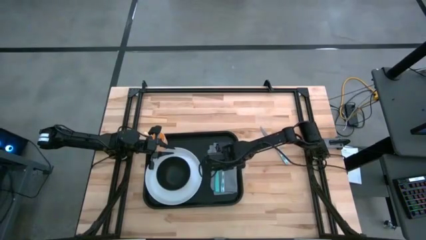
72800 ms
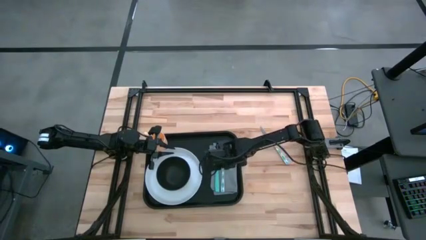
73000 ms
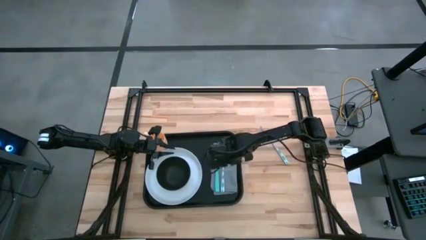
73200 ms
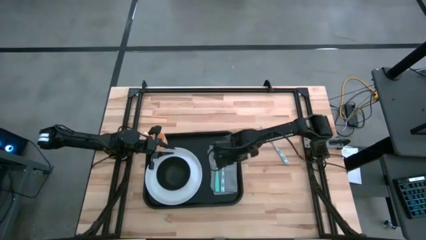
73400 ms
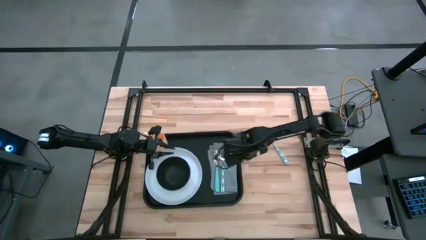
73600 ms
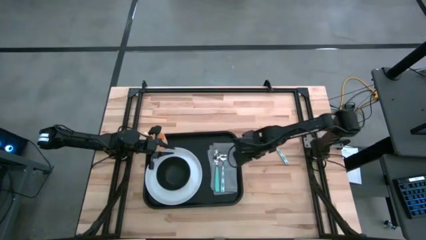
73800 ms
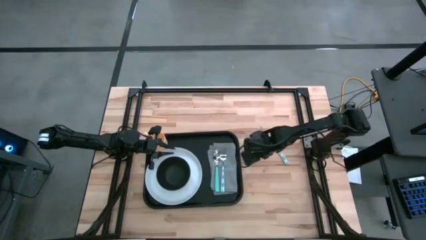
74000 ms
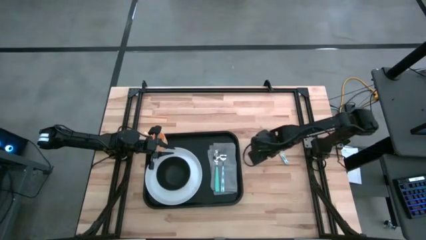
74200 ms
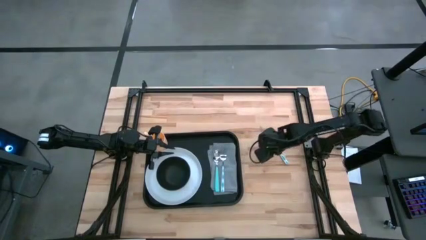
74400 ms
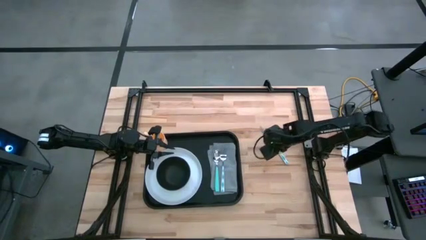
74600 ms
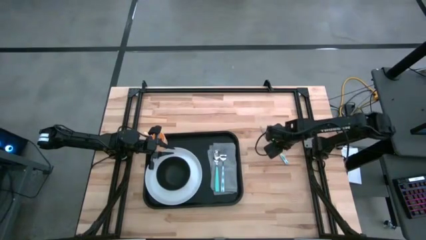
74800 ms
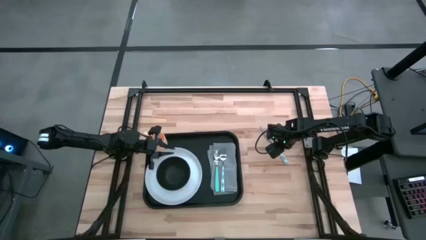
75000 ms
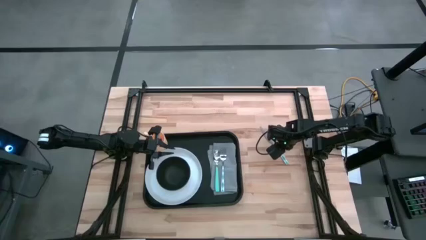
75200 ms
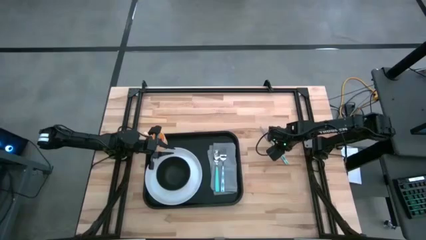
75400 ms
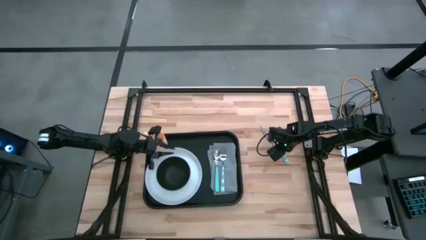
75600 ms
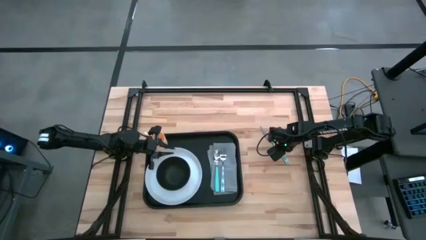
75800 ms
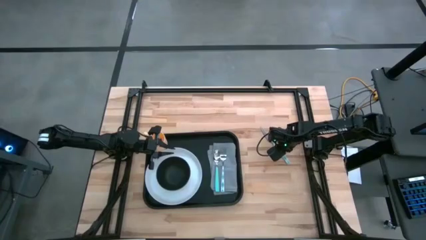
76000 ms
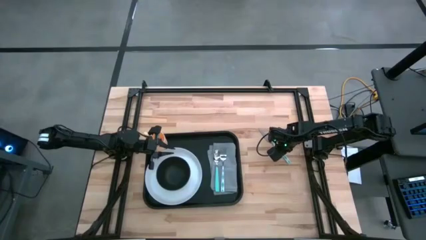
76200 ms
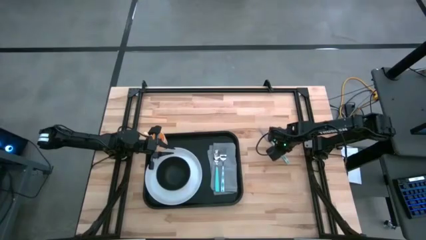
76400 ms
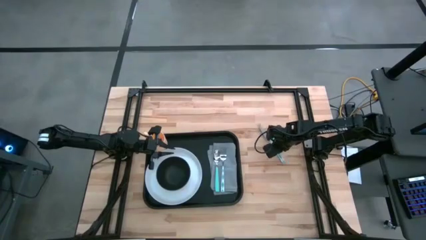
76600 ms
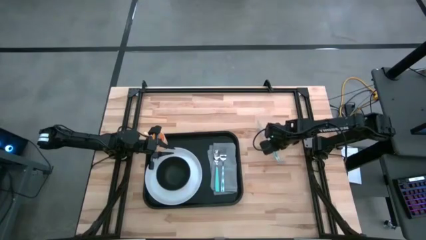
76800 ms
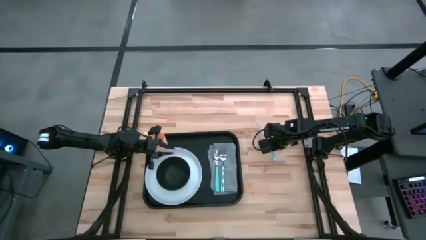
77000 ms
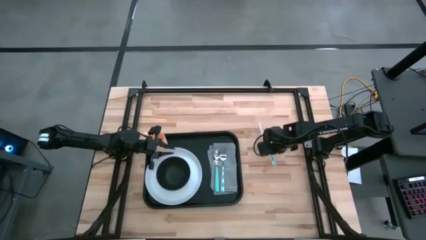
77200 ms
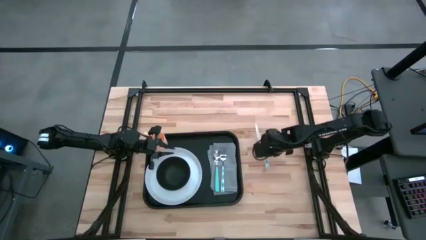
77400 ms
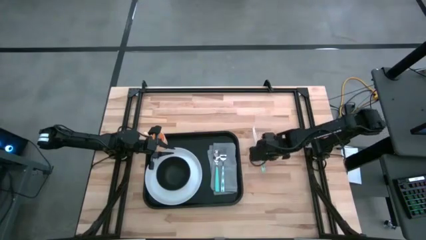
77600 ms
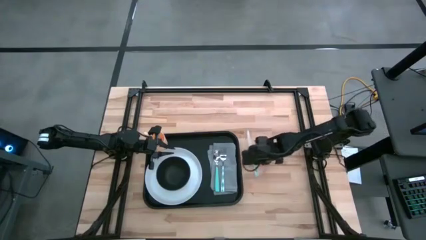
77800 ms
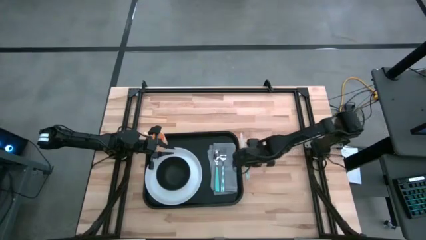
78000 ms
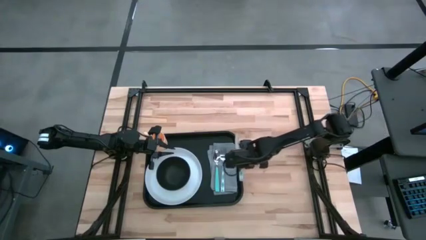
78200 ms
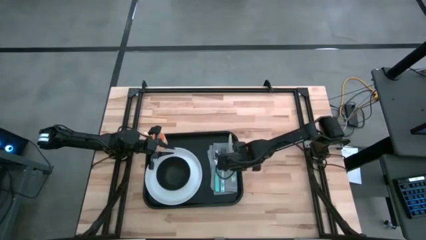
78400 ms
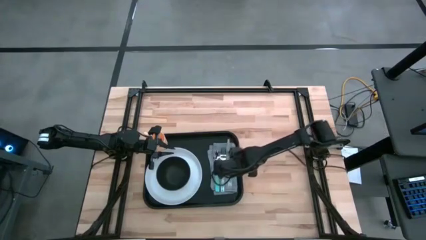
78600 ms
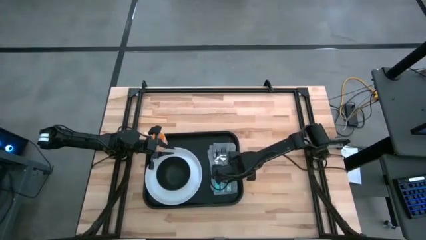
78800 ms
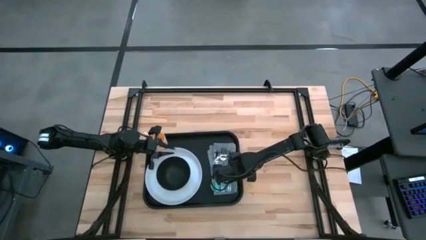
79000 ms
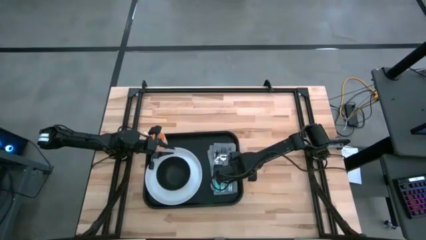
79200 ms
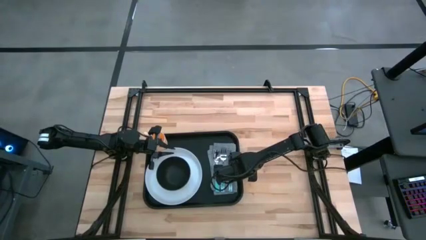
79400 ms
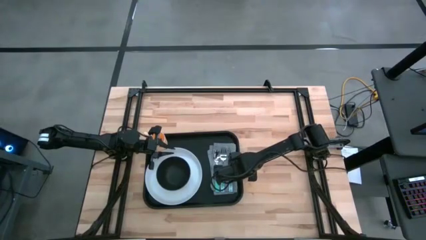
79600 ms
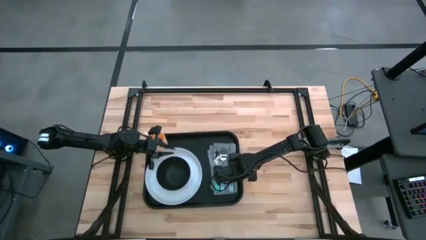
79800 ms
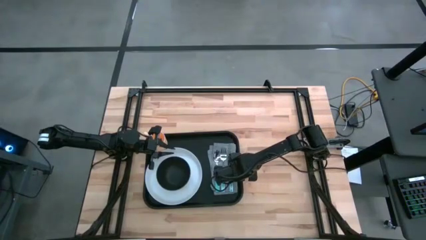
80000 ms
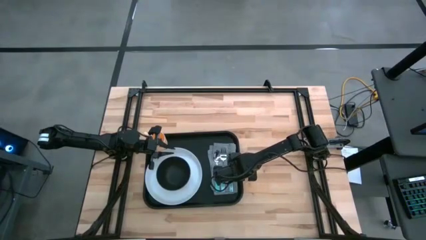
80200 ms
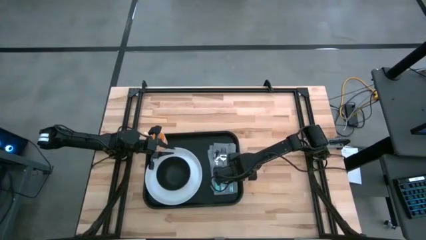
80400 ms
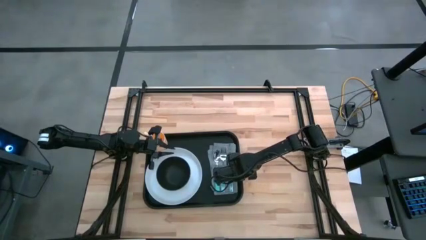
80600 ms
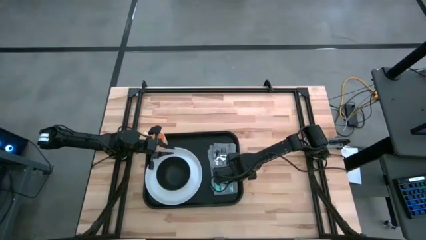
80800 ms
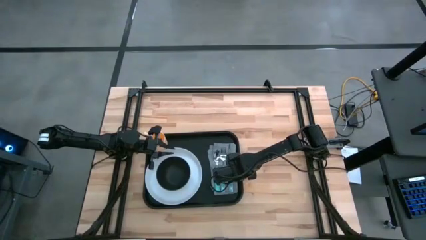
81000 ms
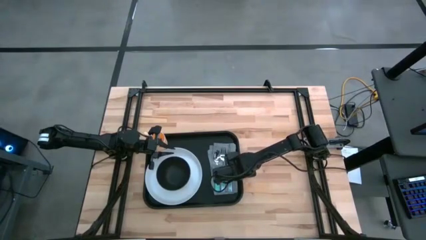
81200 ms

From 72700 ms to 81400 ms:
Task: Set up tray
Put the white knife on the gray napkin to the right of the fork

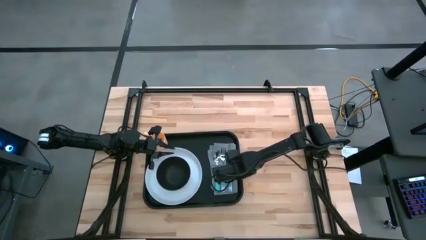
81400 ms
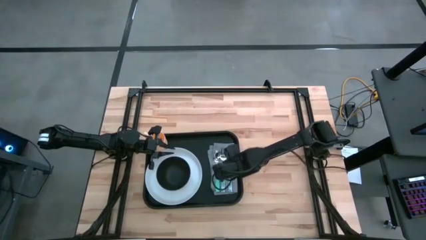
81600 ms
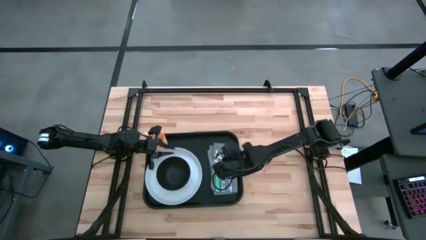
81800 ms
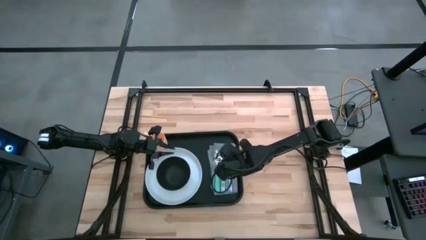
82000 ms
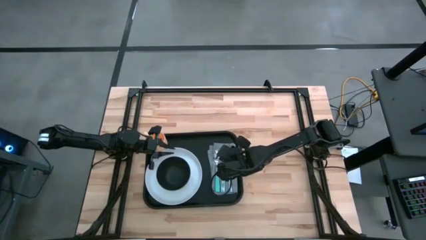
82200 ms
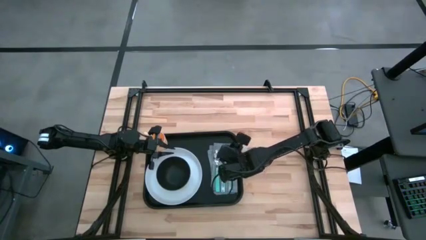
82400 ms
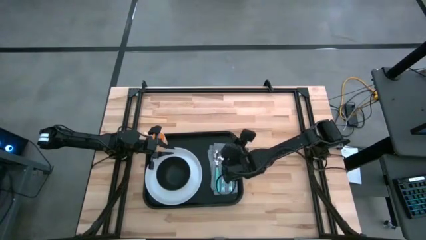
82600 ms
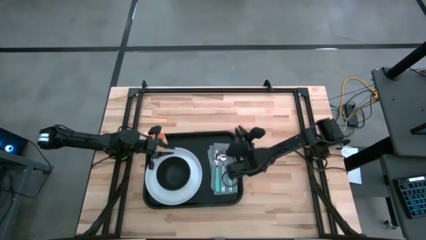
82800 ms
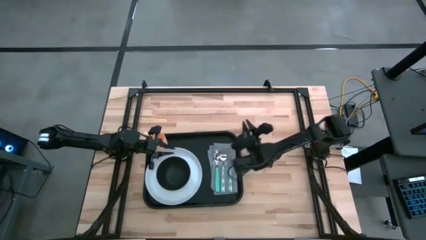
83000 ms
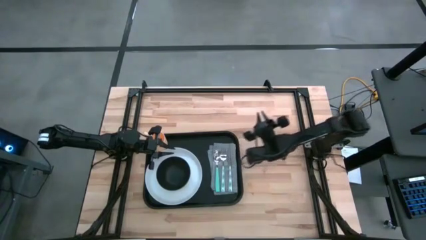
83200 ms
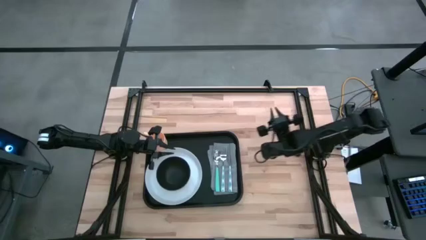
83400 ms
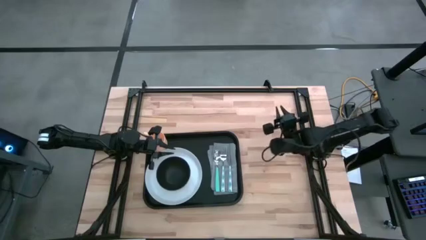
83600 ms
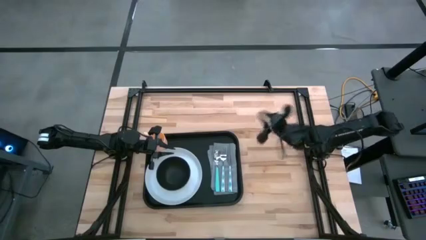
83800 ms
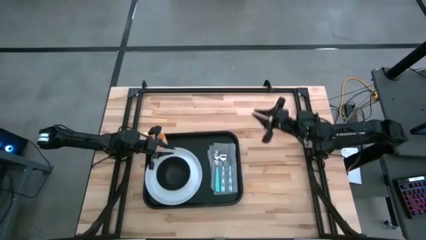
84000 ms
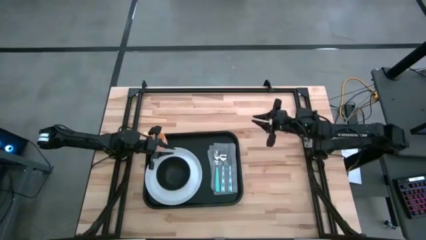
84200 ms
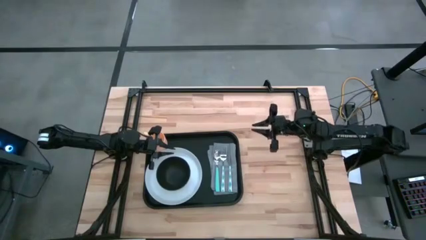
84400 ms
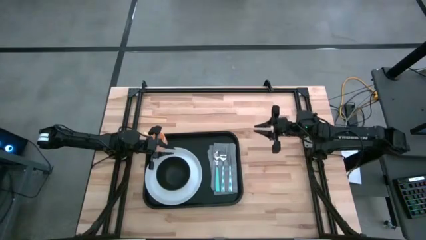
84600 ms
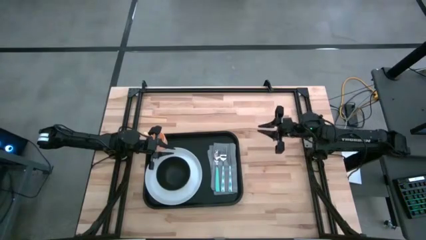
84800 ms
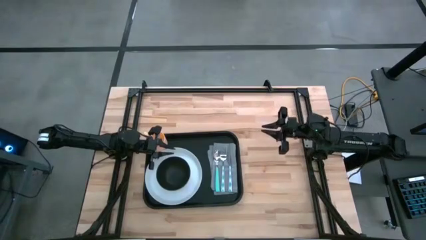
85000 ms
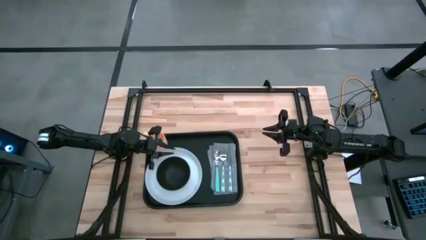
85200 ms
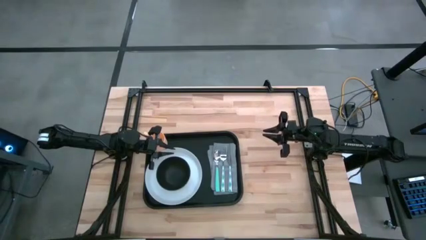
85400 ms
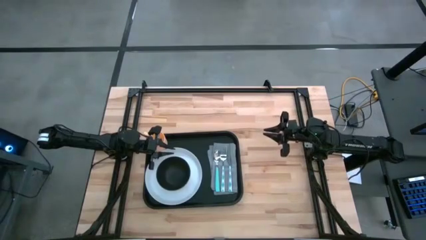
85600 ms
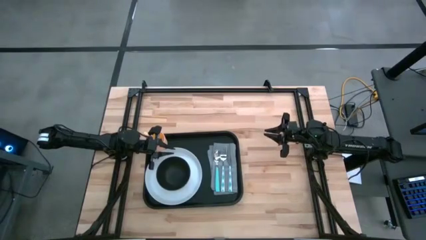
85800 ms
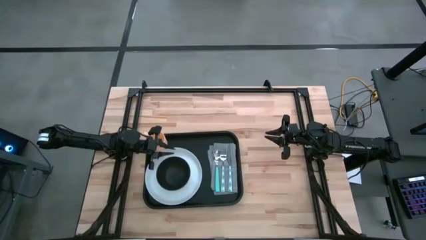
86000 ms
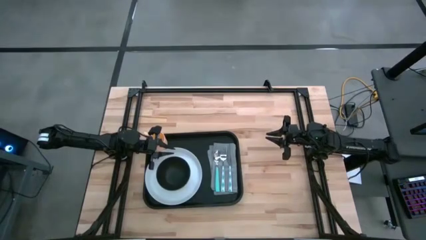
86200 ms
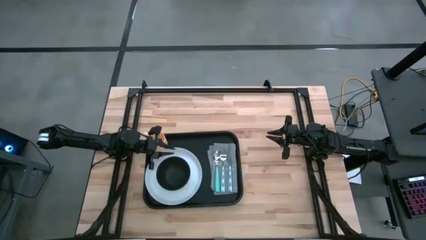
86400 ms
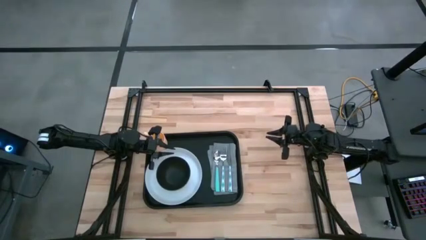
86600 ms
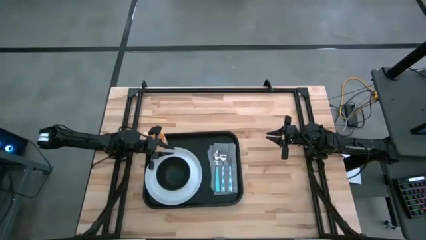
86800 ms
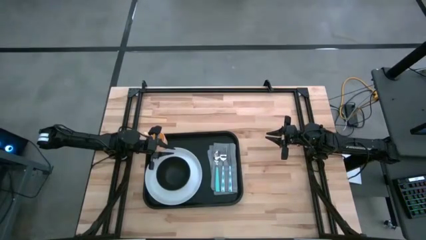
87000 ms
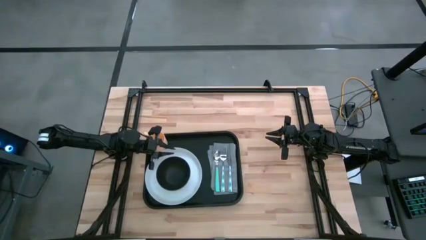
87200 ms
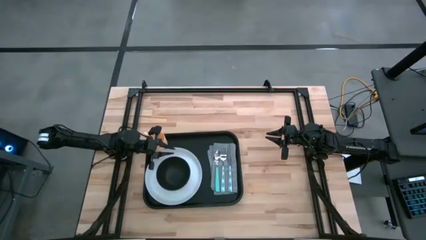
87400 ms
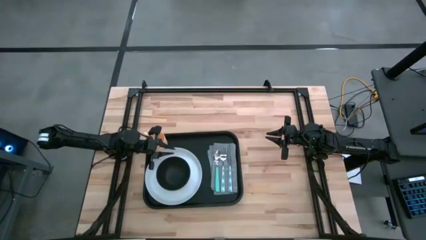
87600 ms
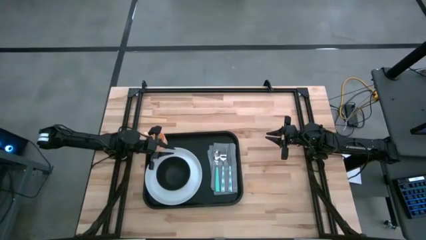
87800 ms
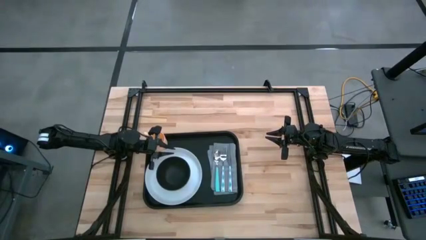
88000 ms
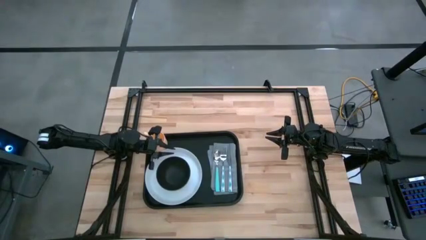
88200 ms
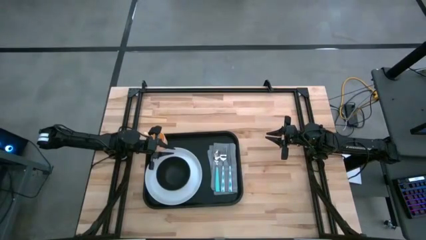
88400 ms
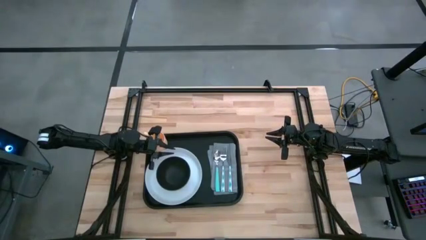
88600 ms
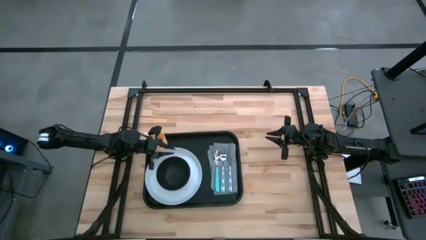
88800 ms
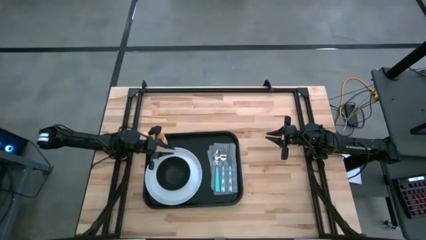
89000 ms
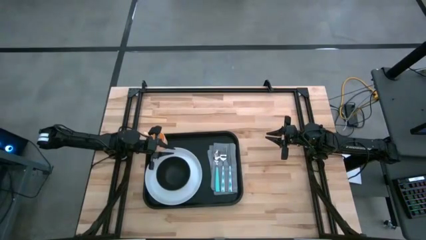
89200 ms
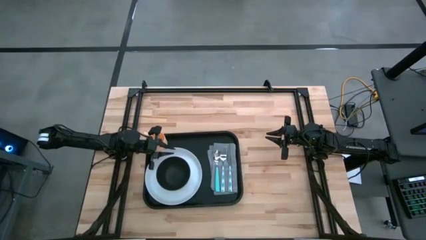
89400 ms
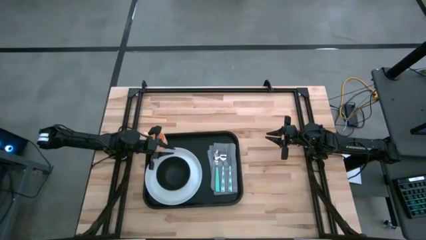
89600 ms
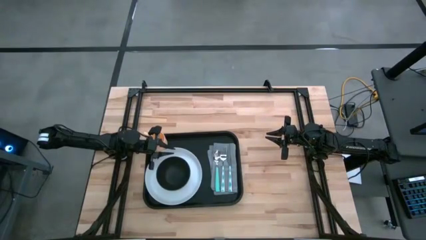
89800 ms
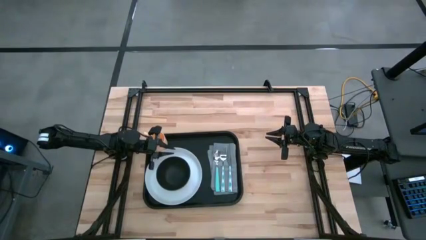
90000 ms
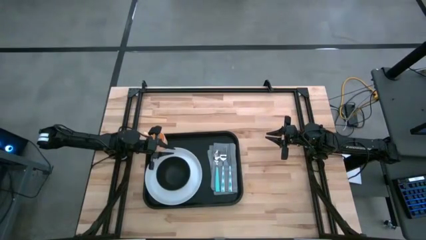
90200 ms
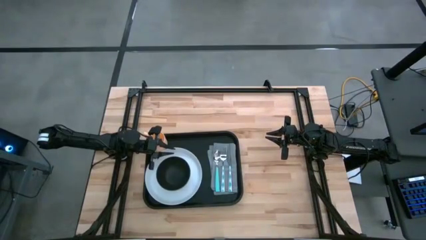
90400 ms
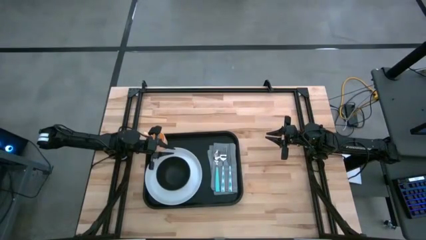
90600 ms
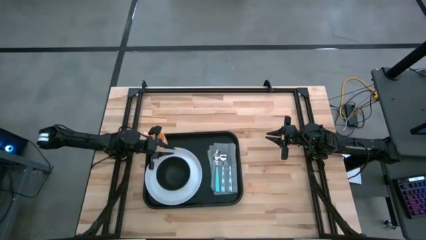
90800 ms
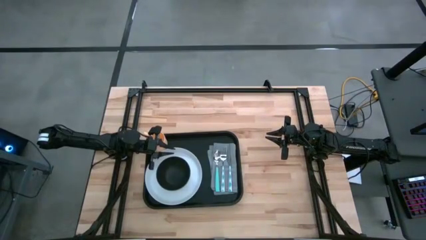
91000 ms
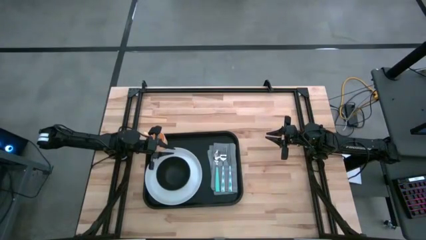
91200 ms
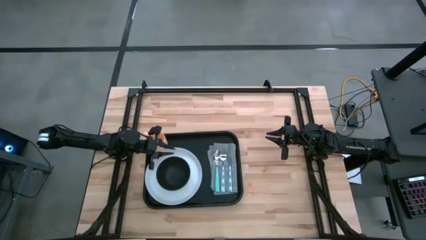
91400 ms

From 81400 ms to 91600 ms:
Return to Home Position
